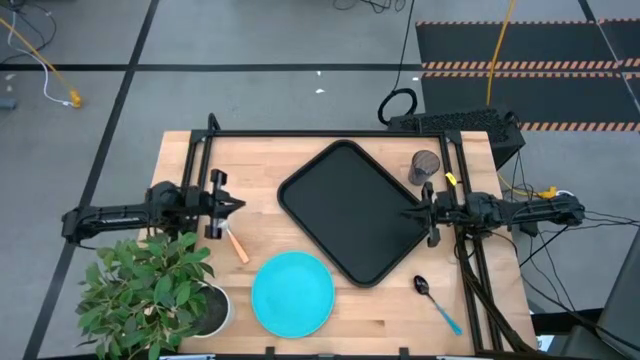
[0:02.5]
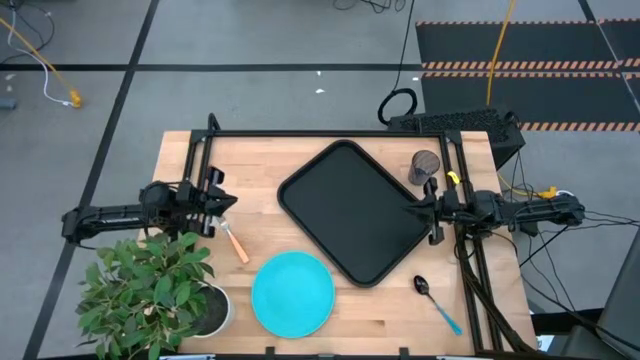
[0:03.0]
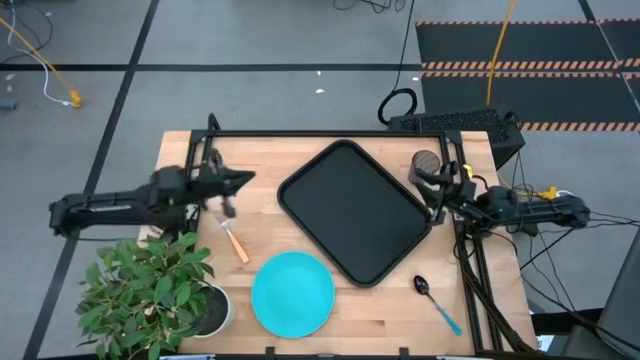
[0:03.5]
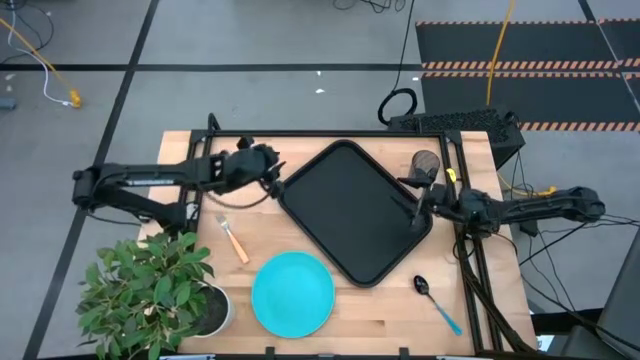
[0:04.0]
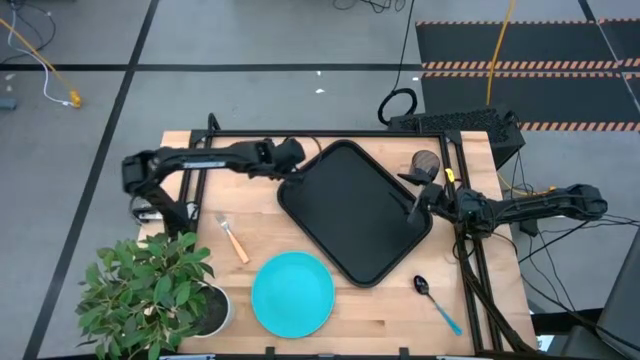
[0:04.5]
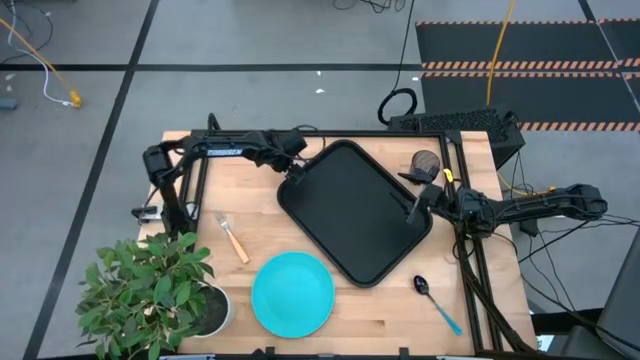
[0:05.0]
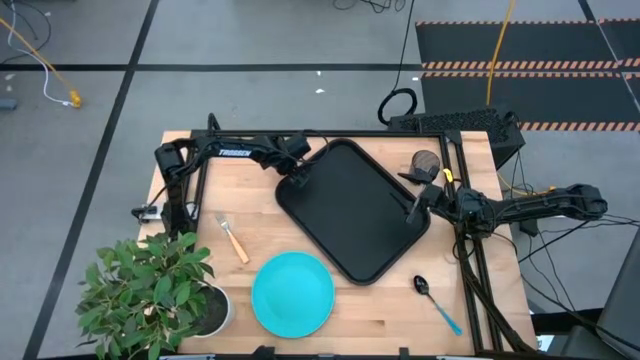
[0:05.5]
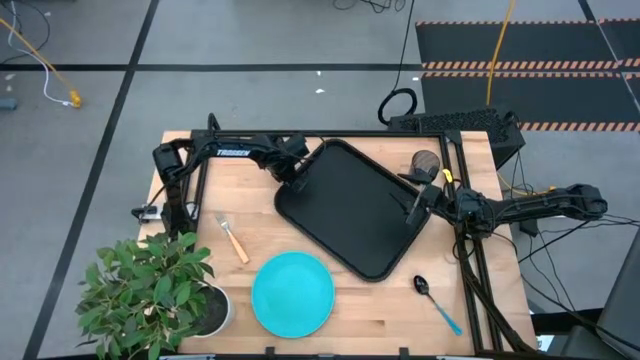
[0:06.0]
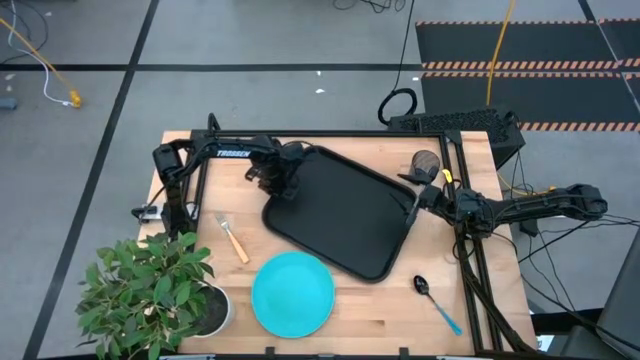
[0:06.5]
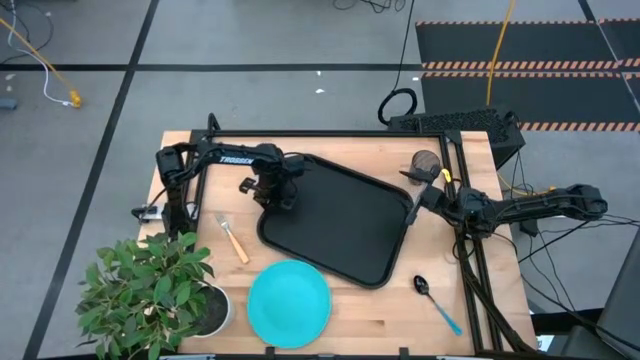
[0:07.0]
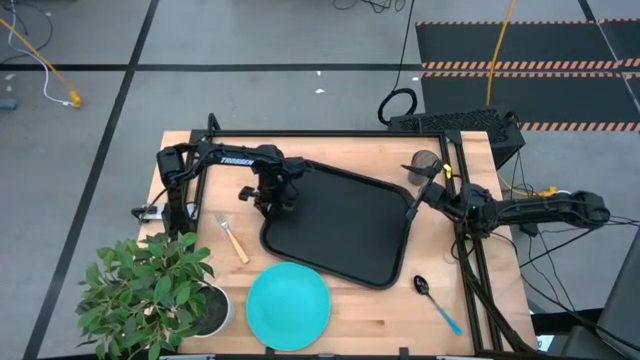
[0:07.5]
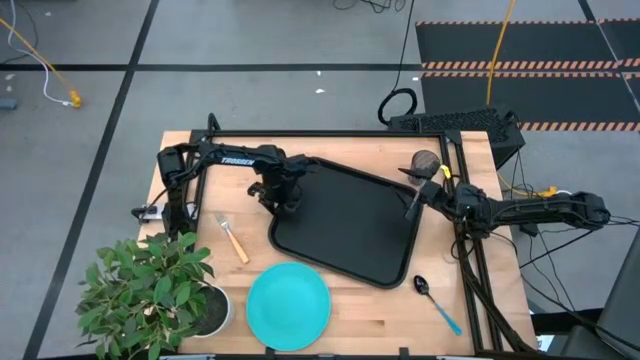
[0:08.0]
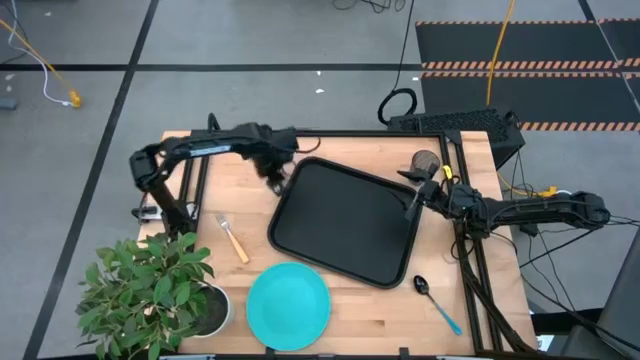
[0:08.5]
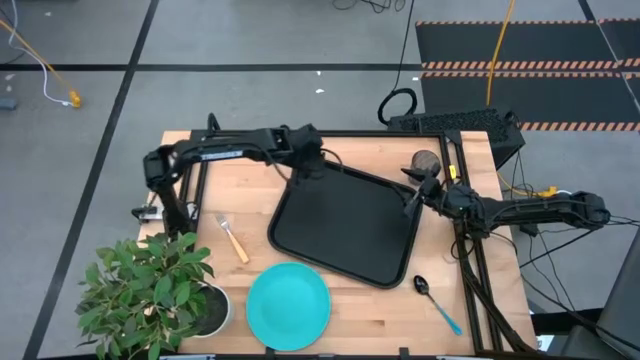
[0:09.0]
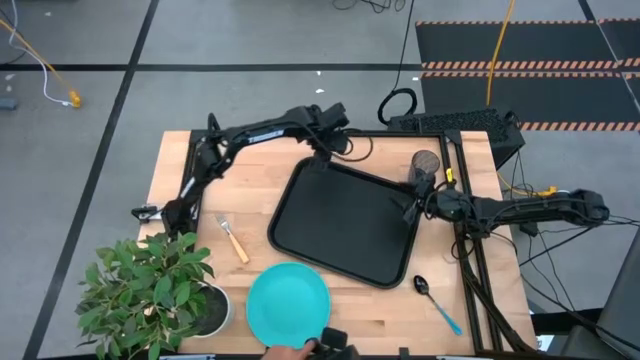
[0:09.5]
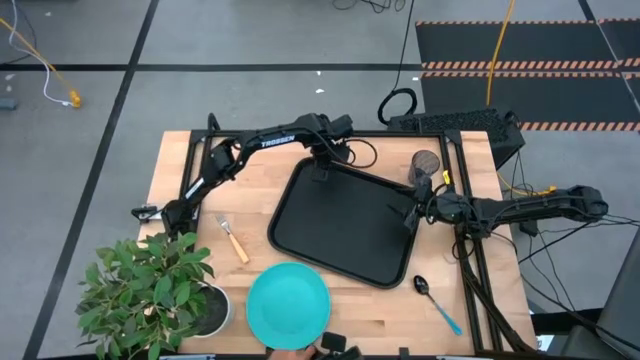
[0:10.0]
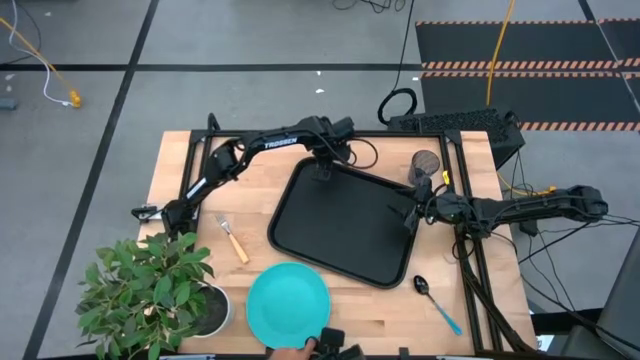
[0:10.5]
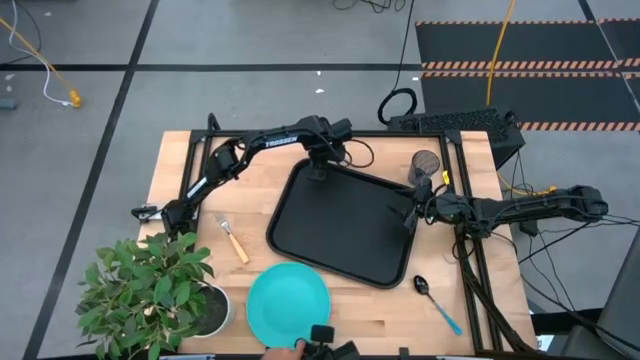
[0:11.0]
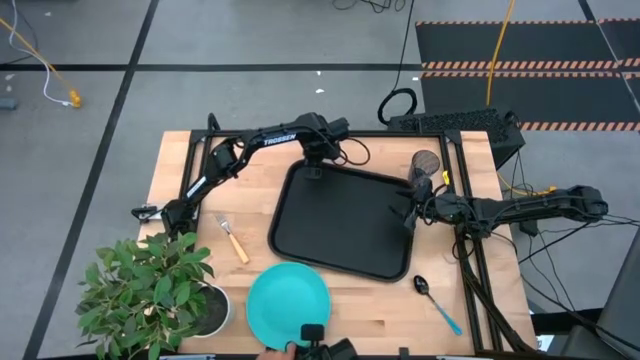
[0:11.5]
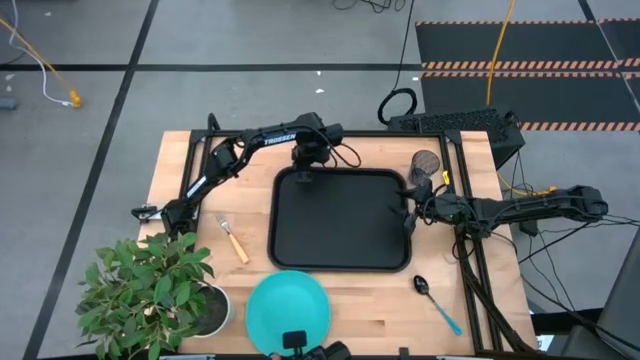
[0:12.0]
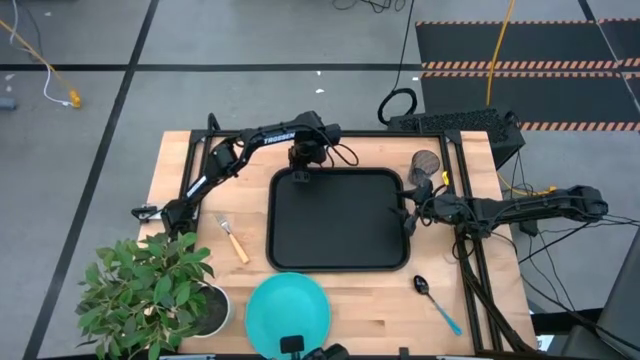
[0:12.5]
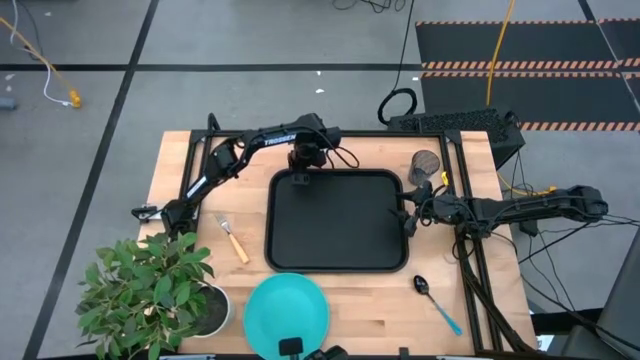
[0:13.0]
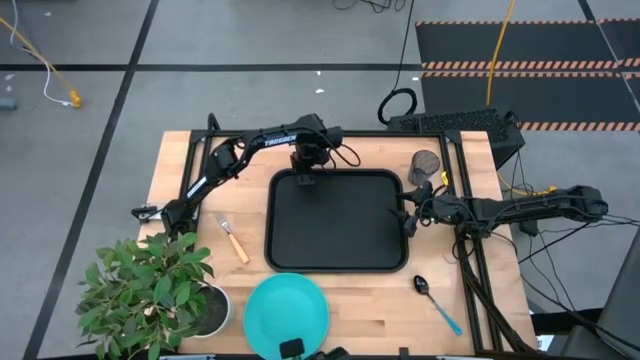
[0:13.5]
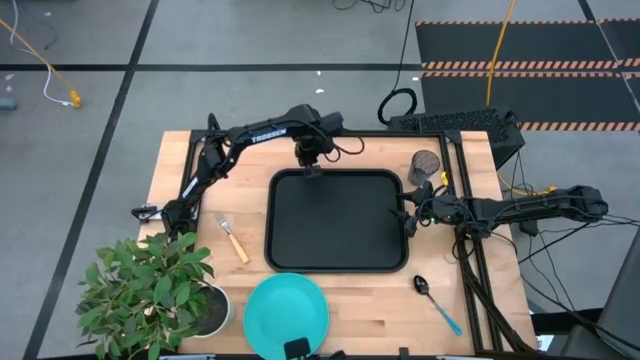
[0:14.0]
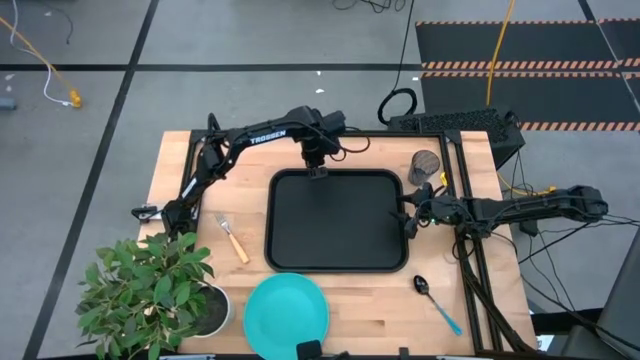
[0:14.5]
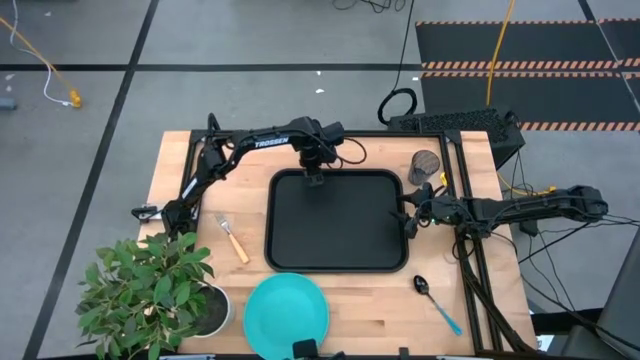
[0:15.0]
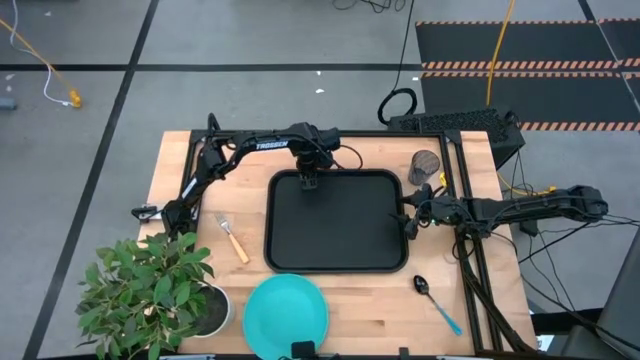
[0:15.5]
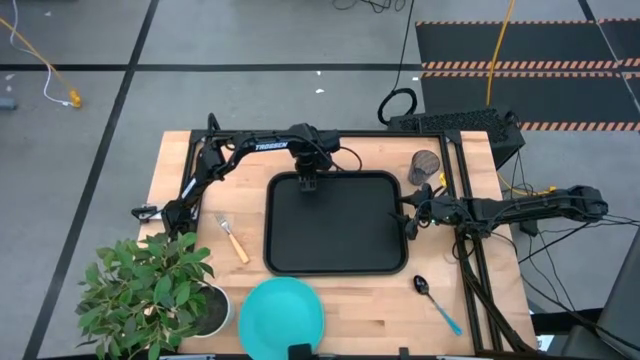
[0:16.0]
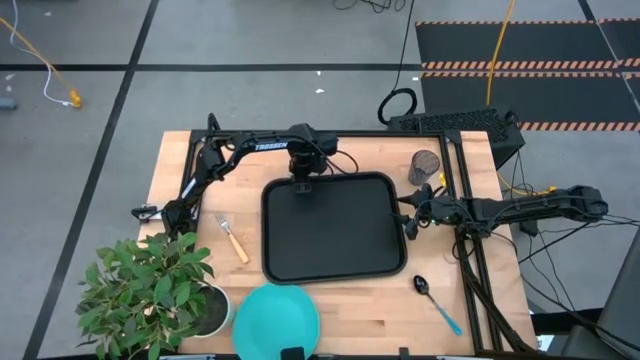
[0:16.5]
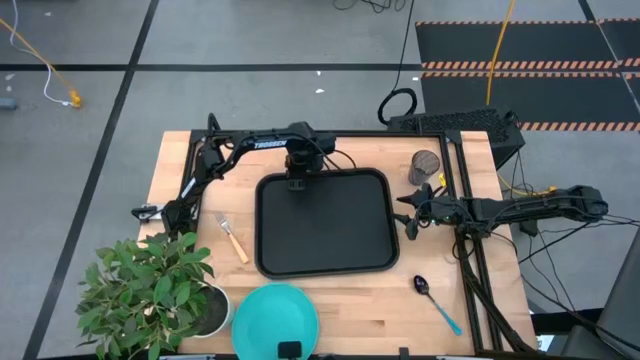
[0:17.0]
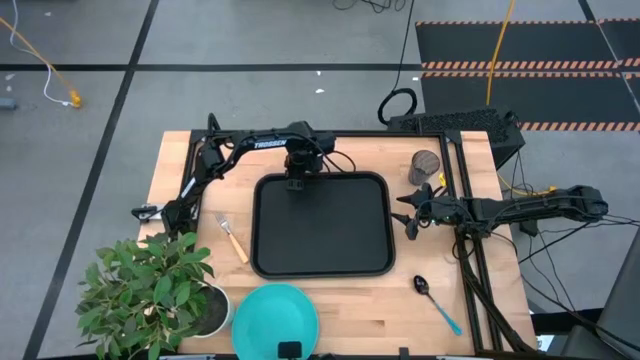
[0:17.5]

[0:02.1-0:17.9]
Task: Pick and place plate/cup/fork/spoon on tray
Prepare the black serving tray

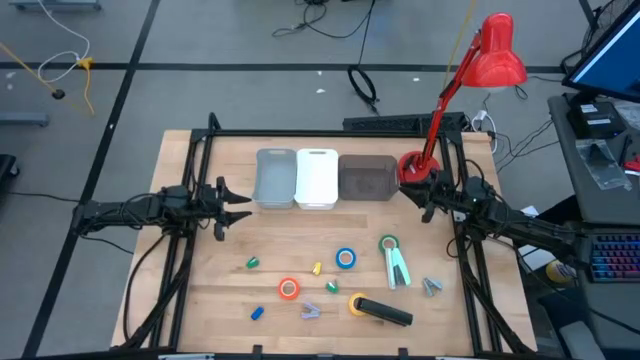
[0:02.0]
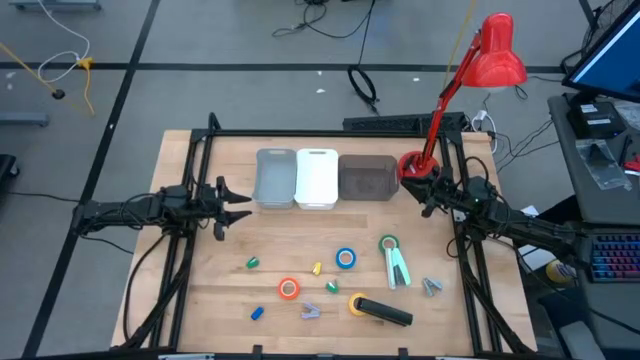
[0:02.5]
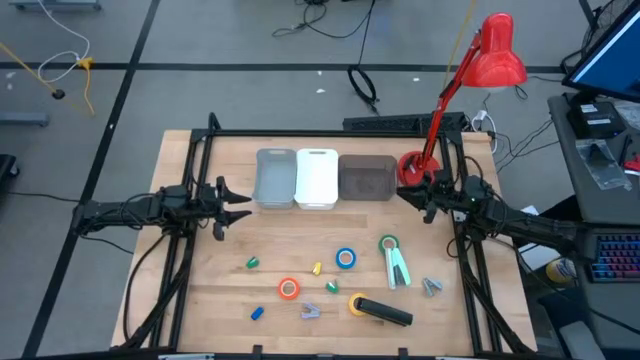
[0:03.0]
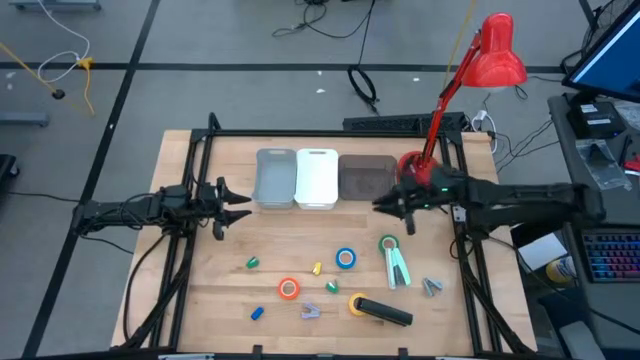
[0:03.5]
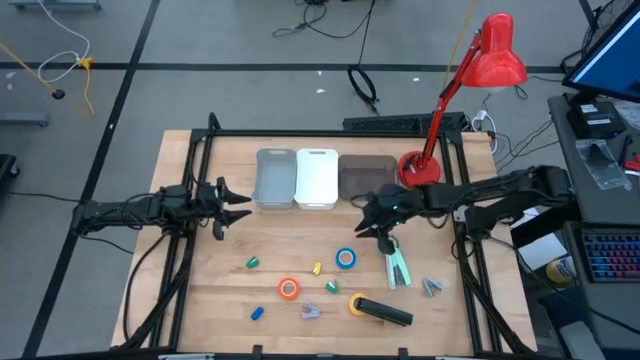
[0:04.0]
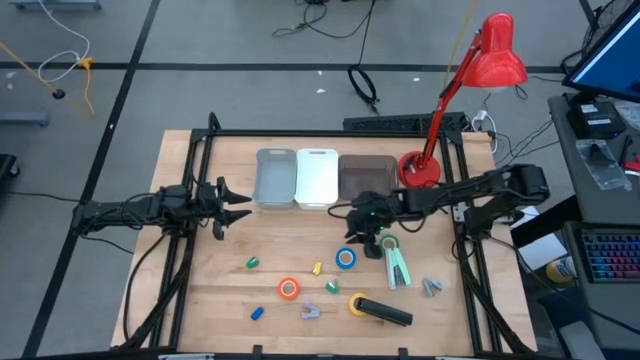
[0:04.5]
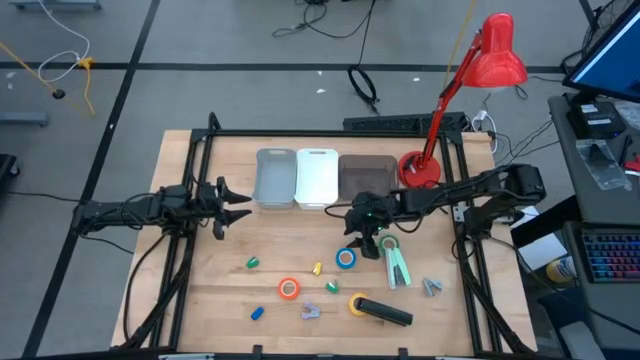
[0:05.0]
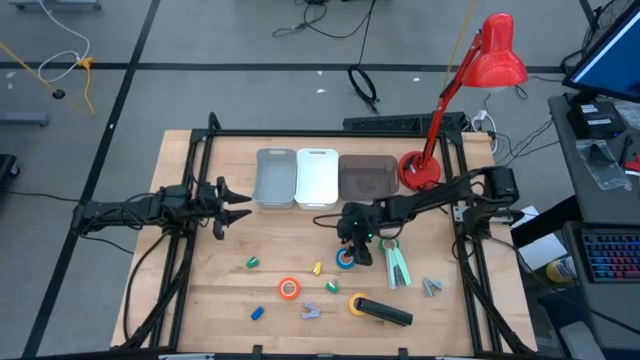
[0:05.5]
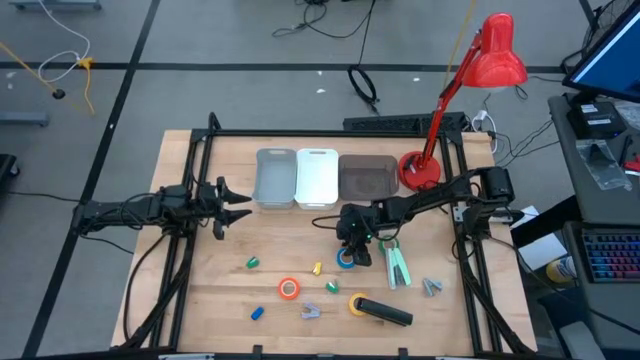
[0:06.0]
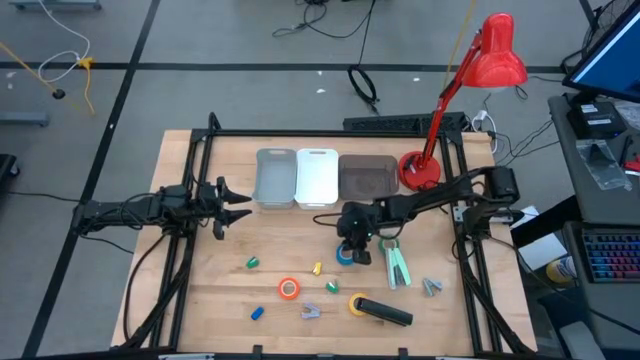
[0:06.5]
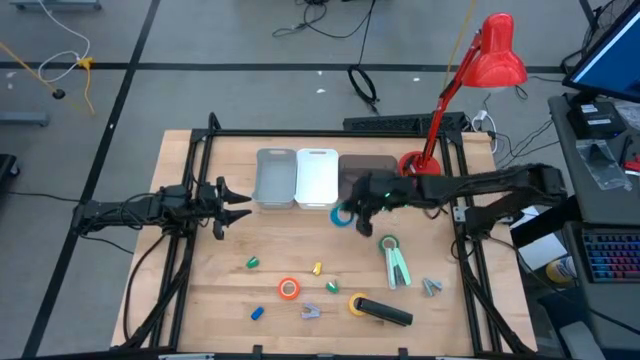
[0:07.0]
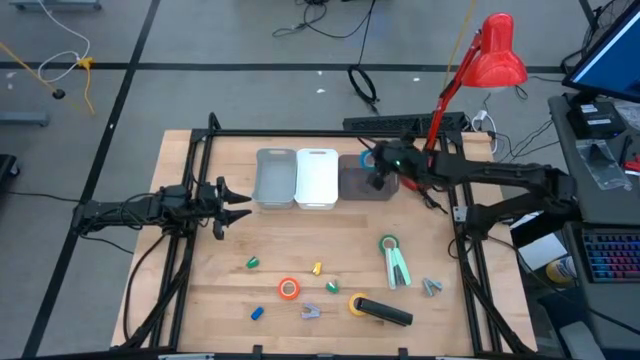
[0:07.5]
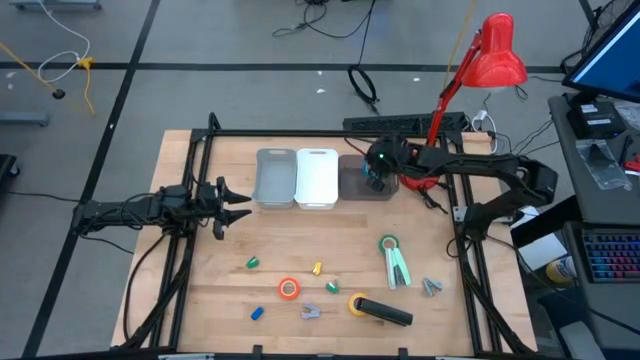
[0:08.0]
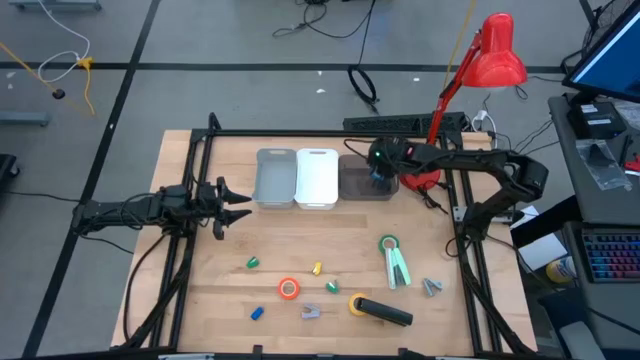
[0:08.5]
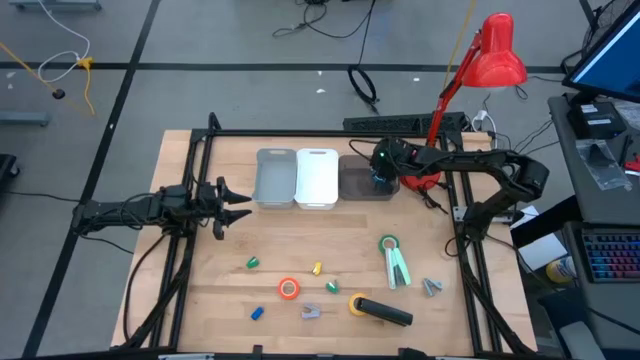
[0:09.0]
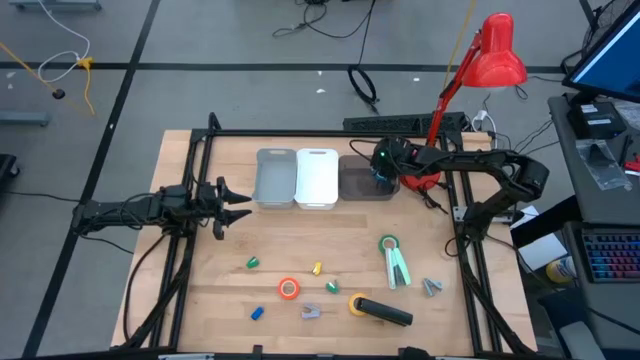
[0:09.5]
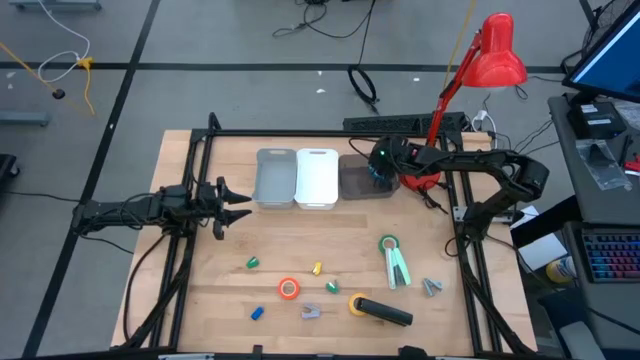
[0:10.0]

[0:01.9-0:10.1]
Task: Pick and place Stapler, Stapler remover, tape
Put the blue tape into the black bin
